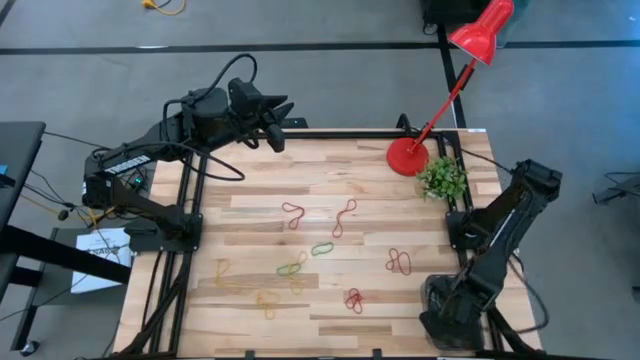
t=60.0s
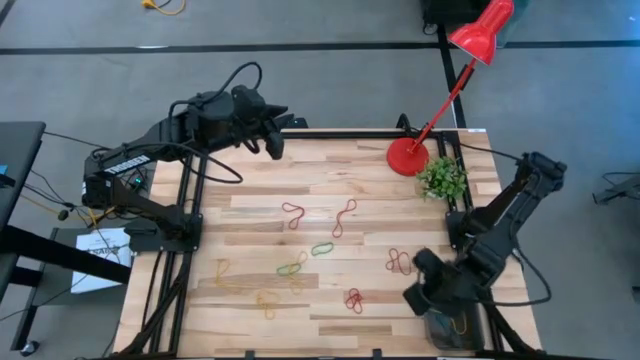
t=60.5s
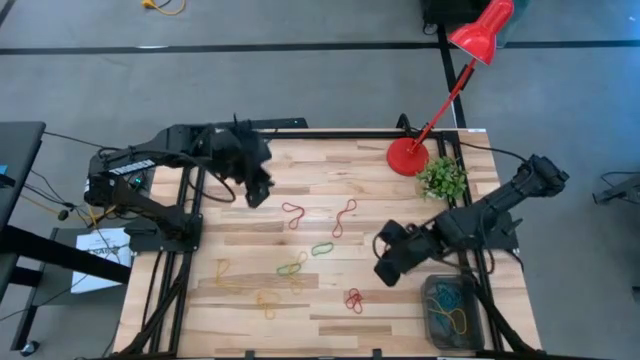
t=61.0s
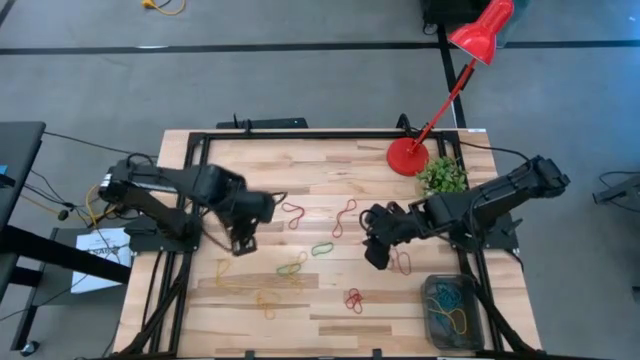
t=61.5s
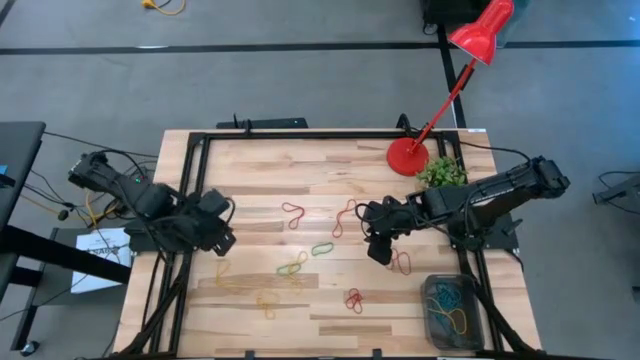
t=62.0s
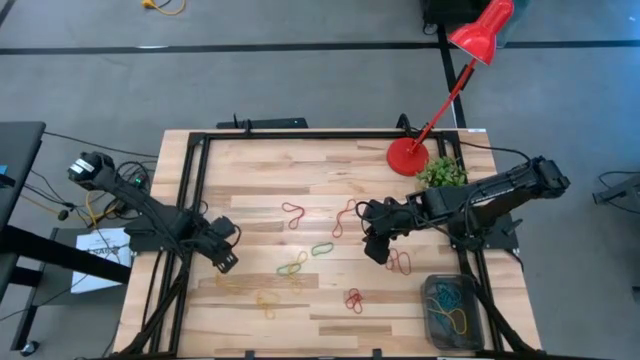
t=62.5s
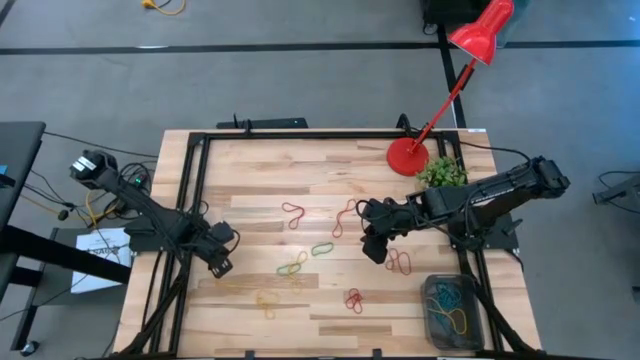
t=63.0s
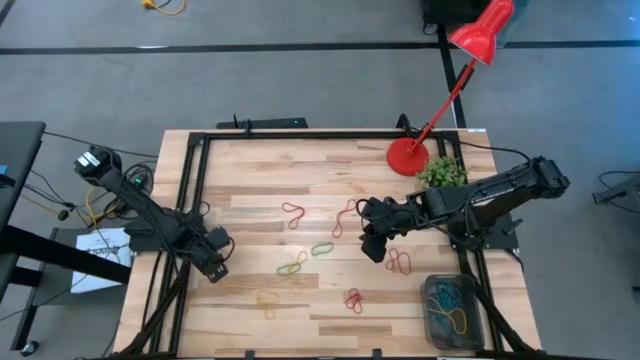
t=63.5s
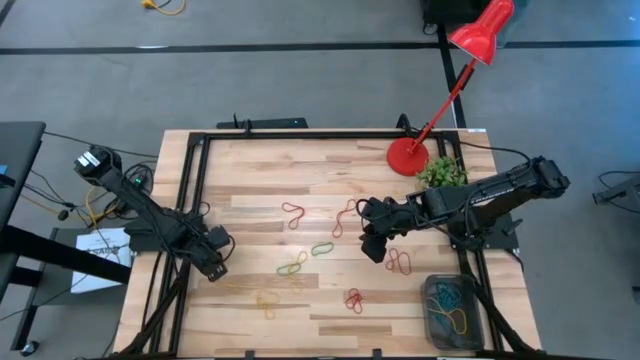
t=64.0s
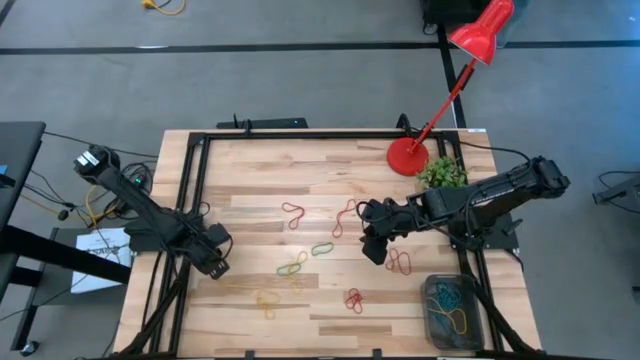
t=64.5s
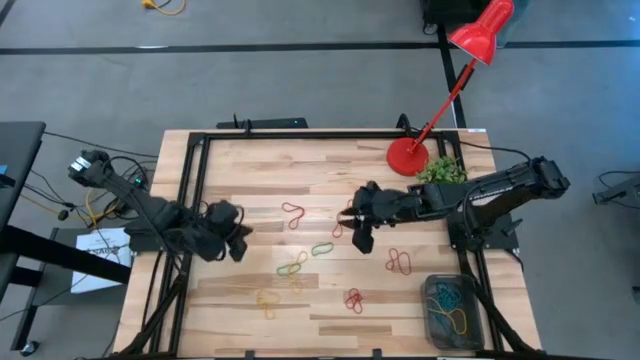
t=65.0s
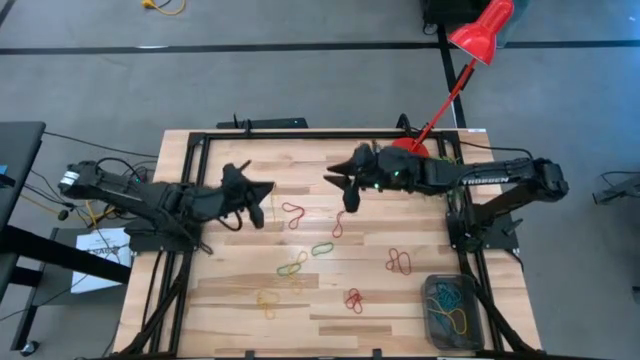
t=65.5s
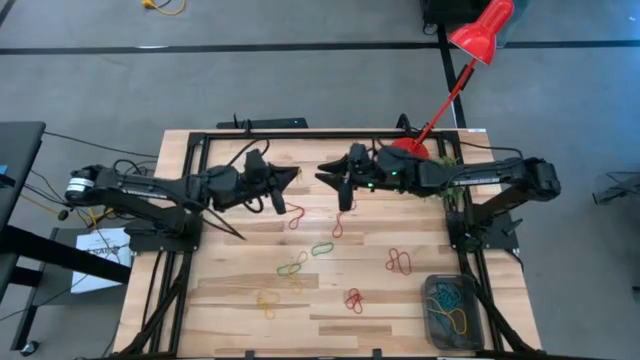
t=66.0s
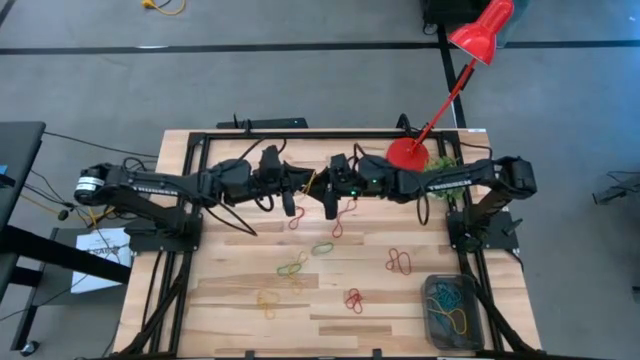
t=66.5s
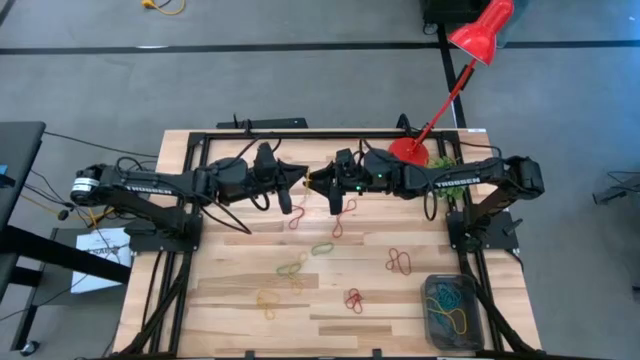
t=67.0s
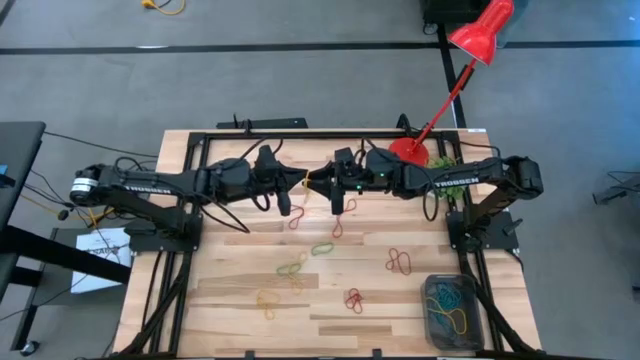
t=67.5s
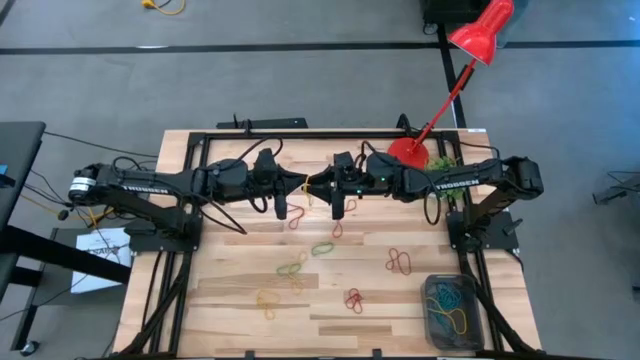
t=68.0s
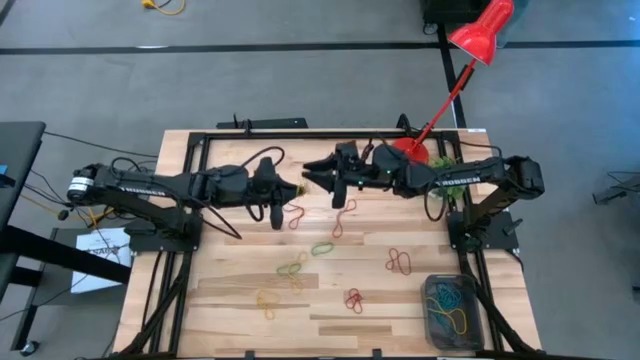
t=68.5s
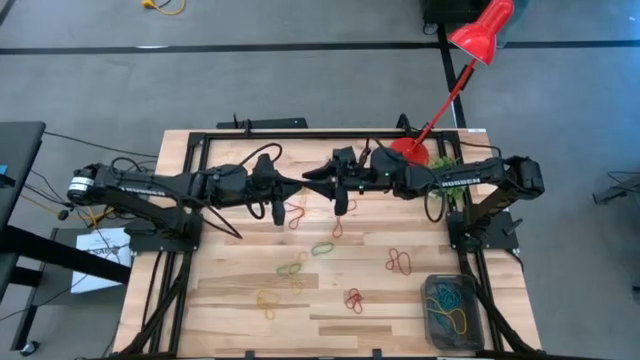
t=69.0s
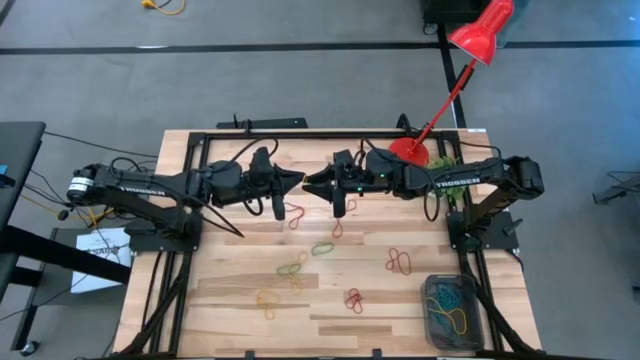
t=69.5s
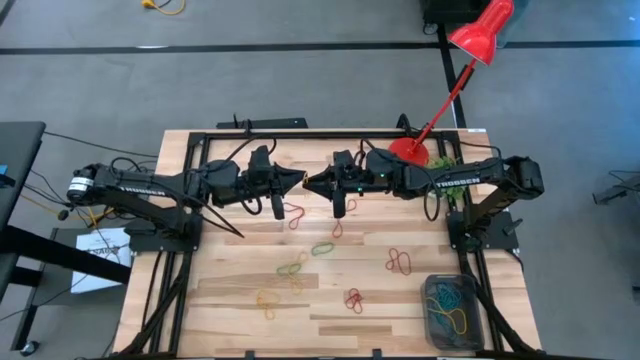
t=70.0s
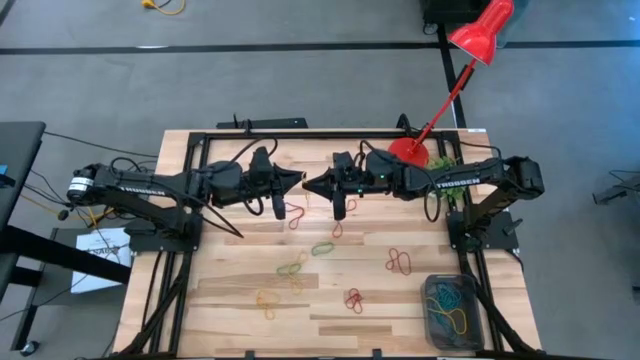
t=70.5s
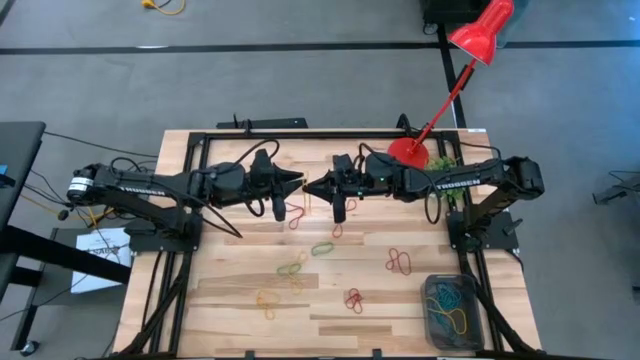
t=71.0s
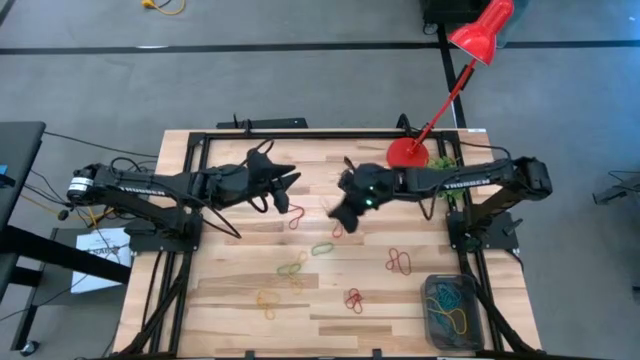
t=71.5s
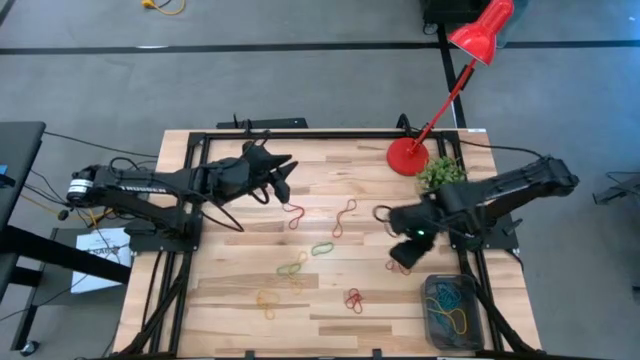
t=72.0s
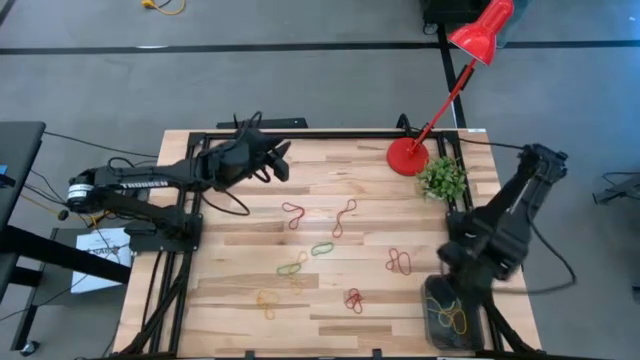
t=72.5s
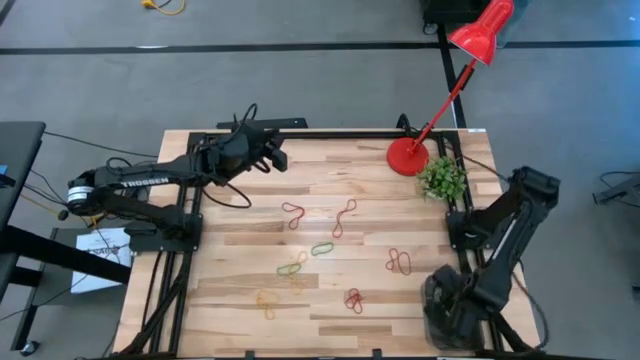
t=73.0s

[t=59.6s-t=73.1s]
Task: Pick and place items into bin
Put the yellow rubber band into the black bin

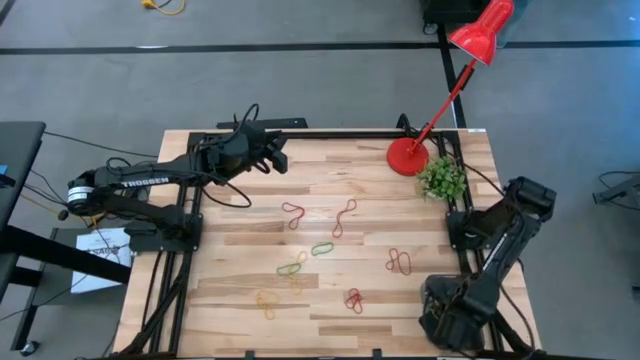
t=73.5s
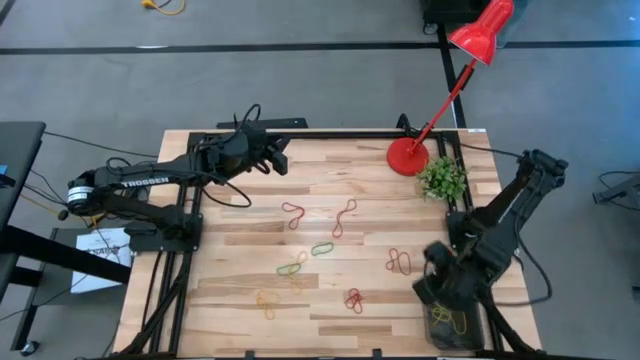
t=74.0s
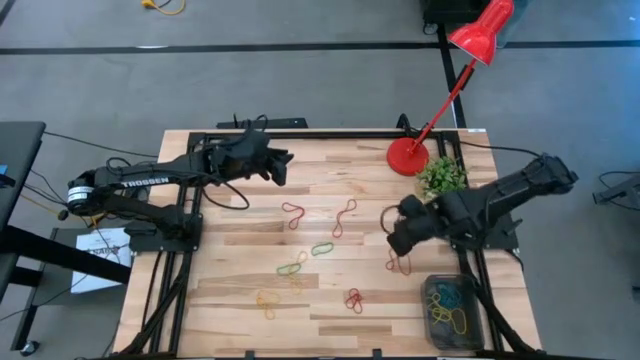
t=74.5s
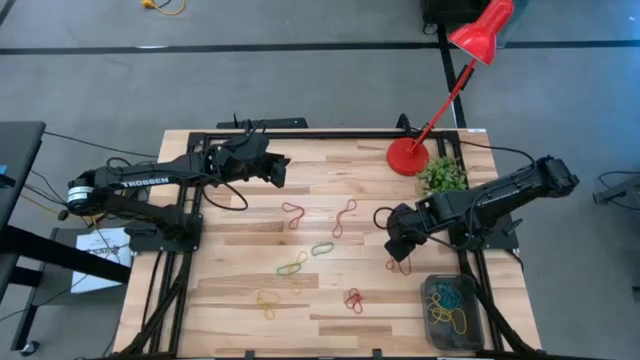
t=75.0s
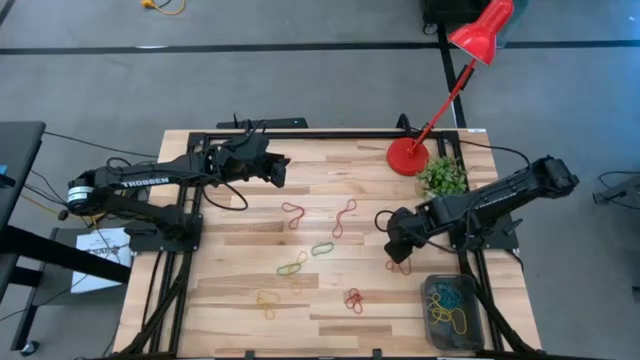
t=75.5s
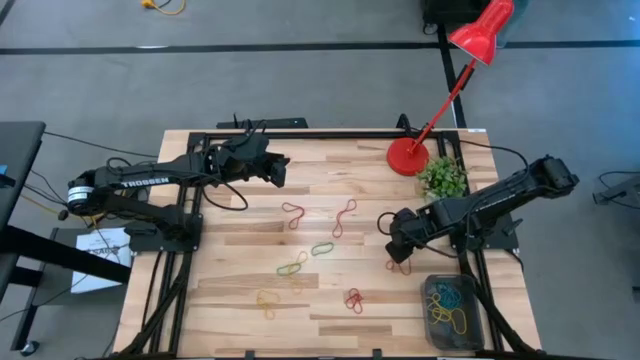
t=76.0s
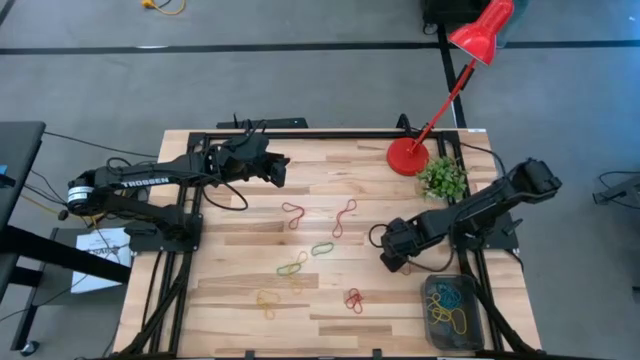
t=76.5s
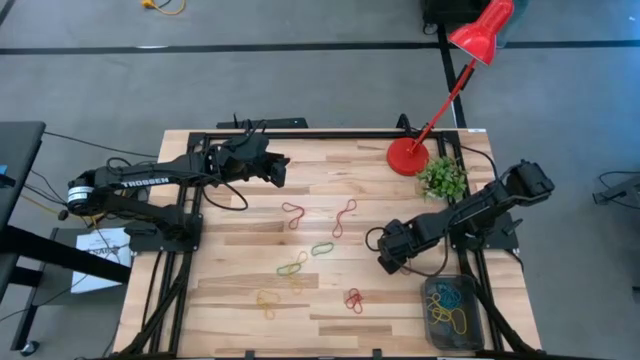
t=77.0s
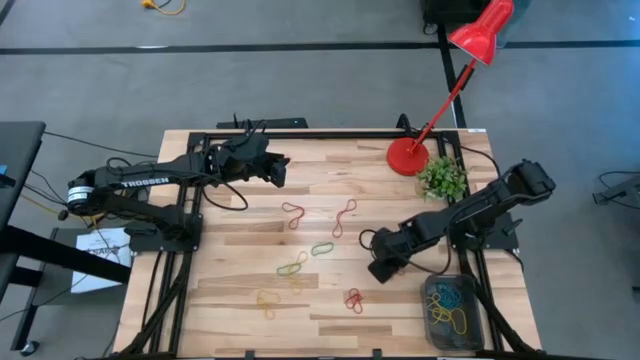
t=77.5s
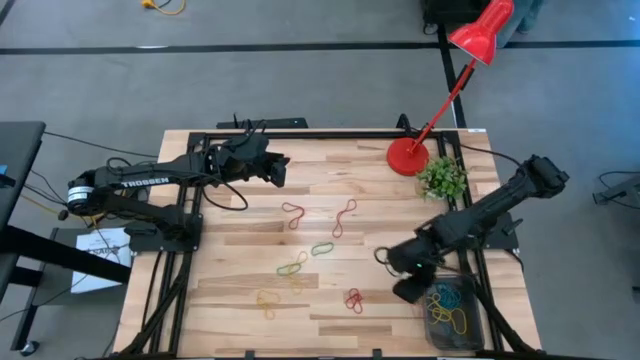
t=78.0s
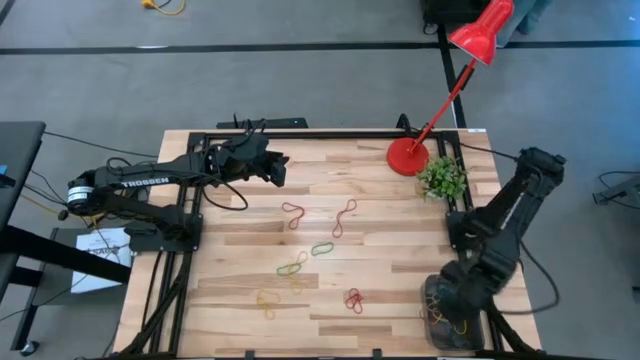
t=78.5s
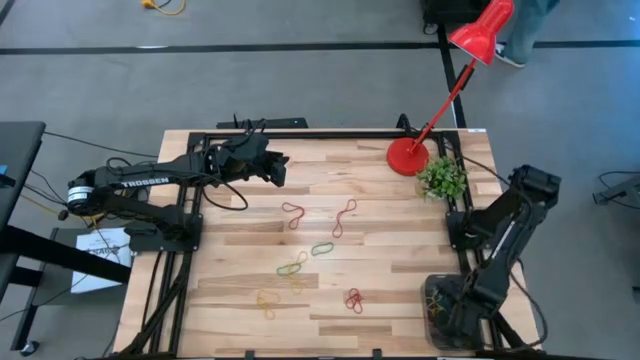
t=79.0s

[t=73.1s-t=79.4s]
Put the red rubber band into the black bin

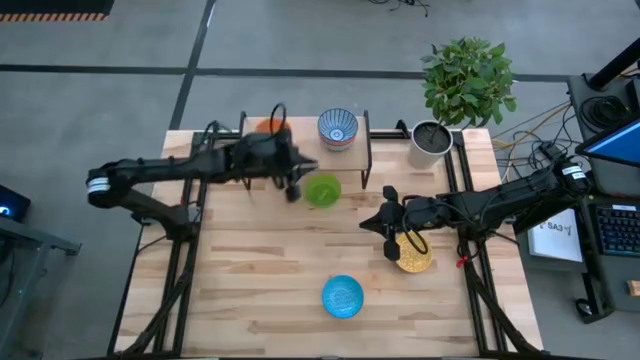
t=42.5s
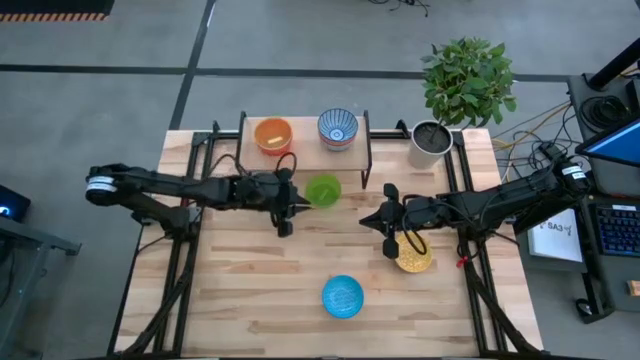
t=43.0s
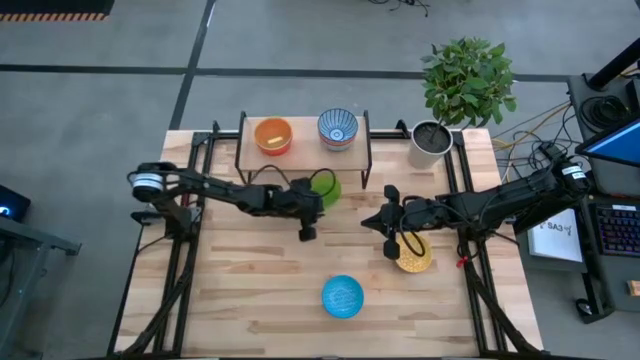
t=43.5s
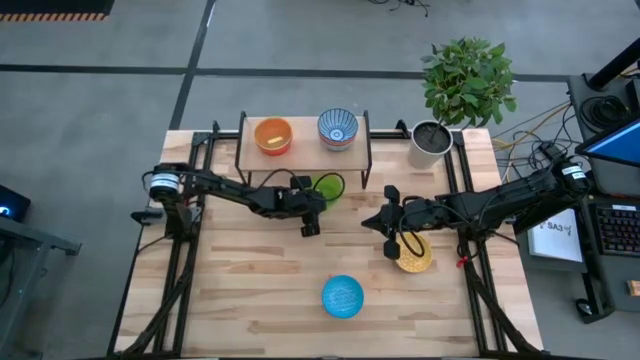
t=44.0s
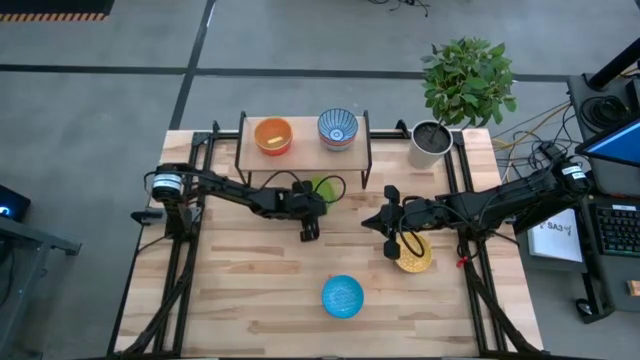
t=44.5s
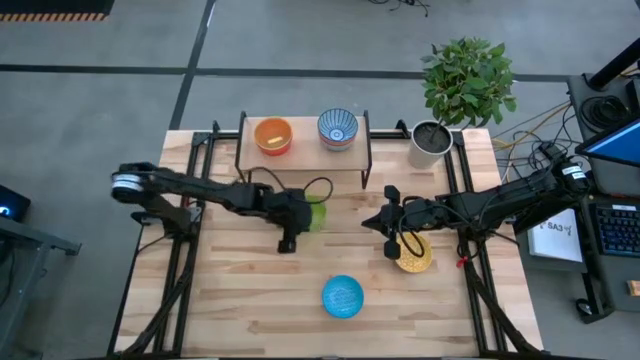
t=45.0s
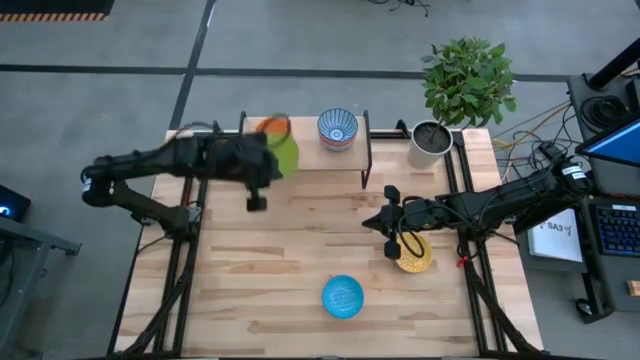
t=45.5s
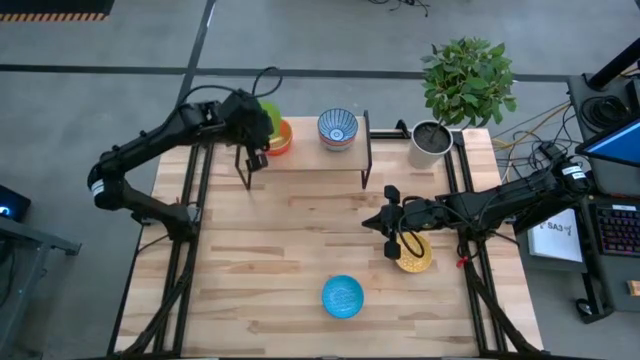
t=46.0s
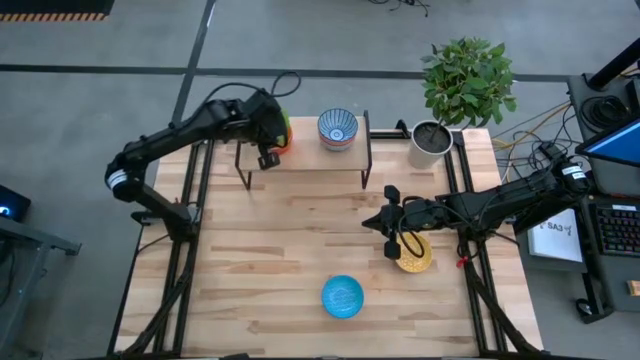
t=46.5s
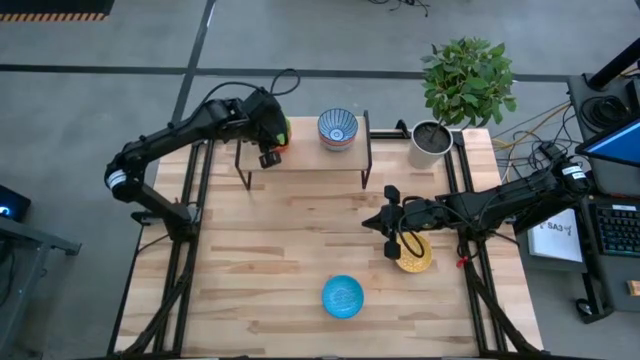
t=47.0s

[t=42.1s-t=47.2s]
Task: Place and stack bowls onto a shelf
Stack the transparent green bowl on top of the transparent yellow bowl on the shelf
